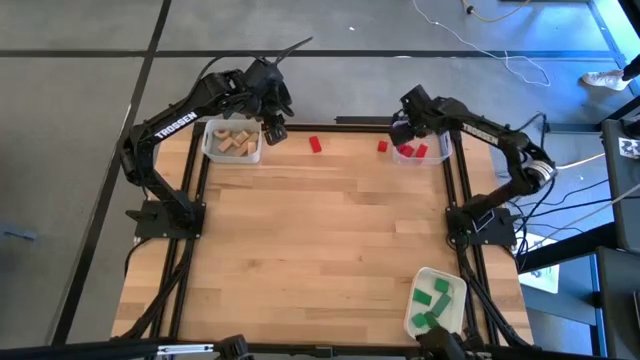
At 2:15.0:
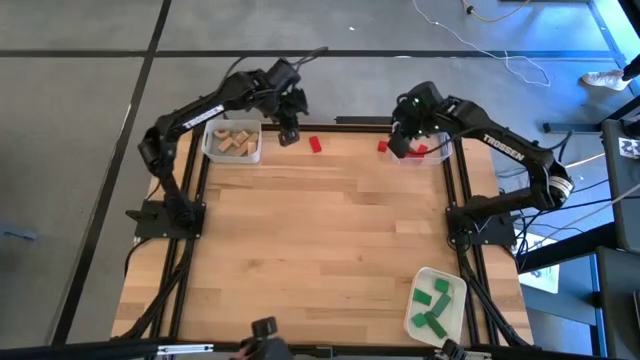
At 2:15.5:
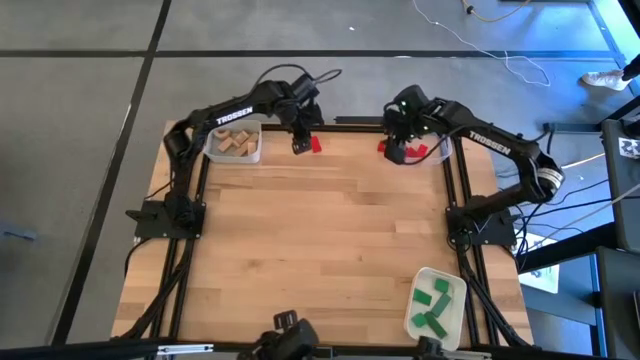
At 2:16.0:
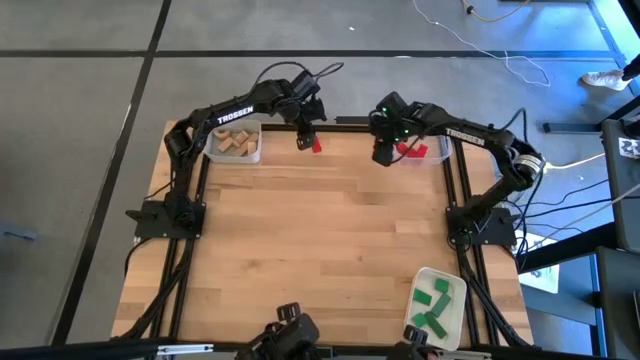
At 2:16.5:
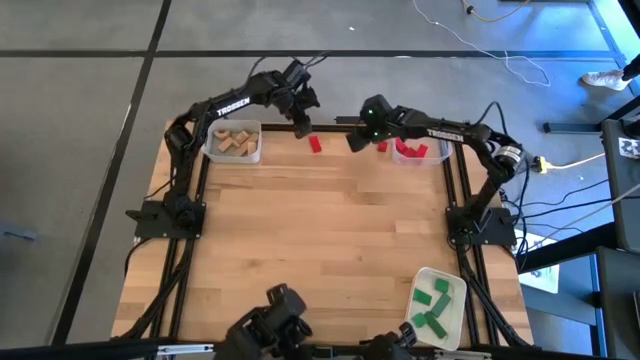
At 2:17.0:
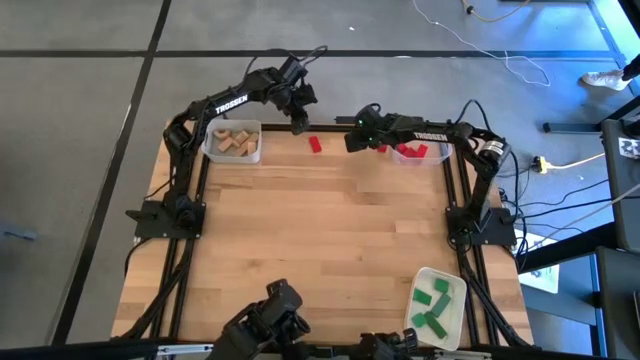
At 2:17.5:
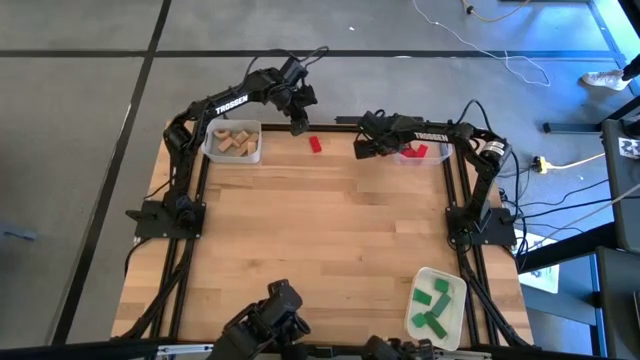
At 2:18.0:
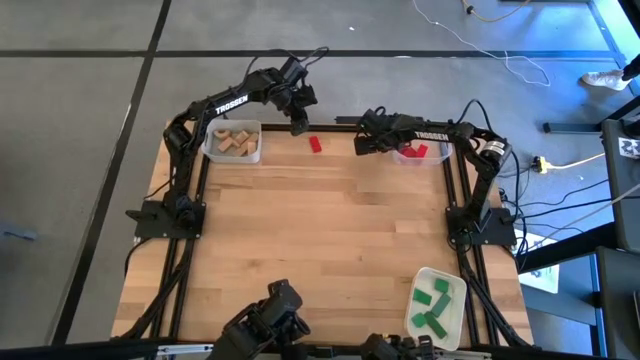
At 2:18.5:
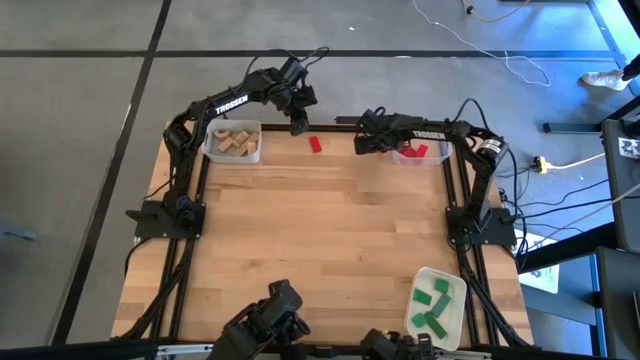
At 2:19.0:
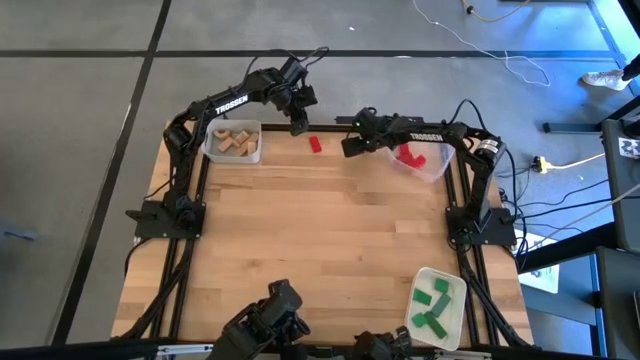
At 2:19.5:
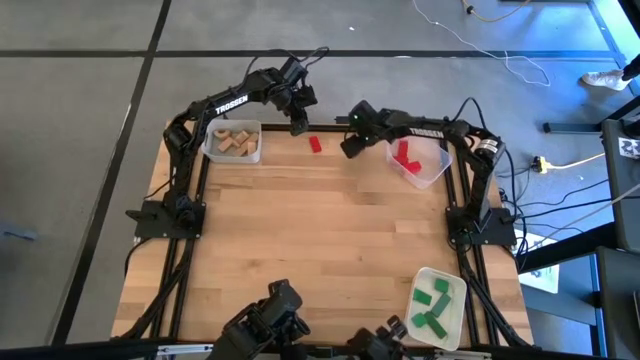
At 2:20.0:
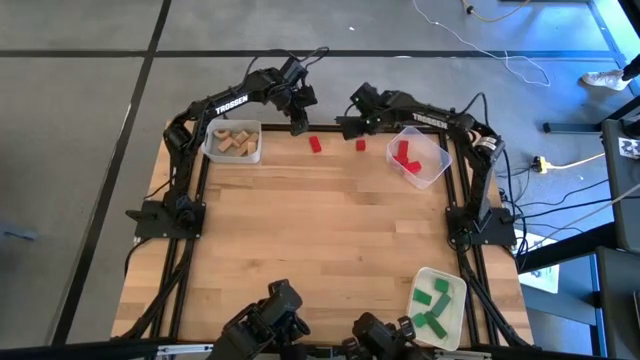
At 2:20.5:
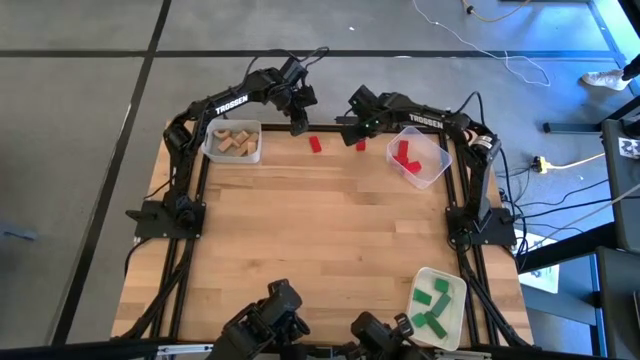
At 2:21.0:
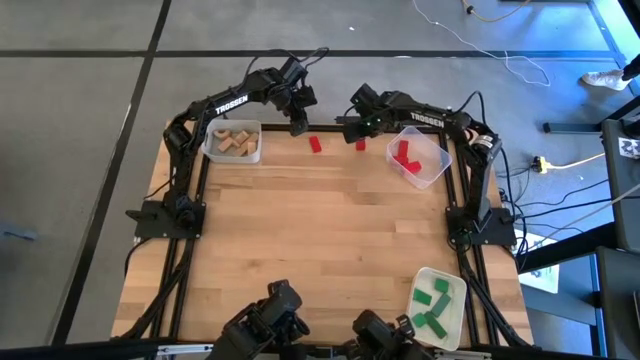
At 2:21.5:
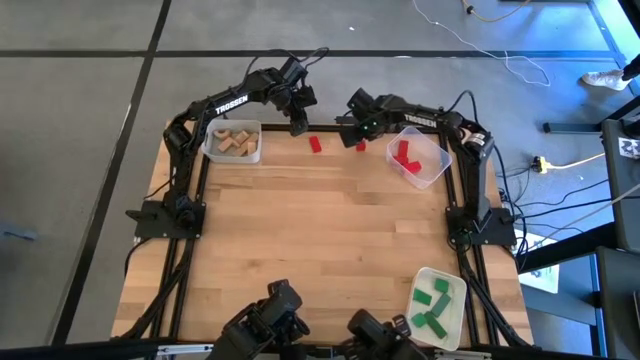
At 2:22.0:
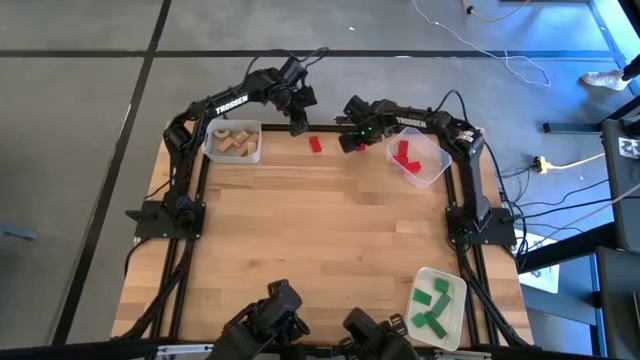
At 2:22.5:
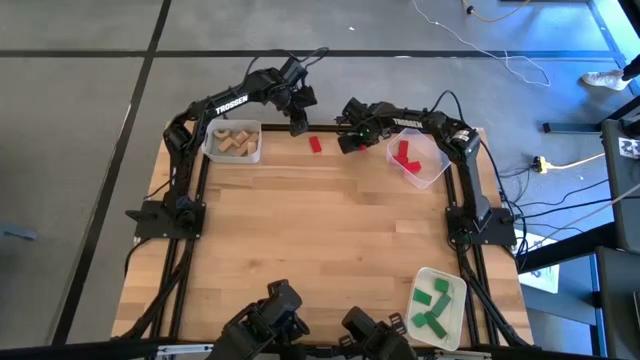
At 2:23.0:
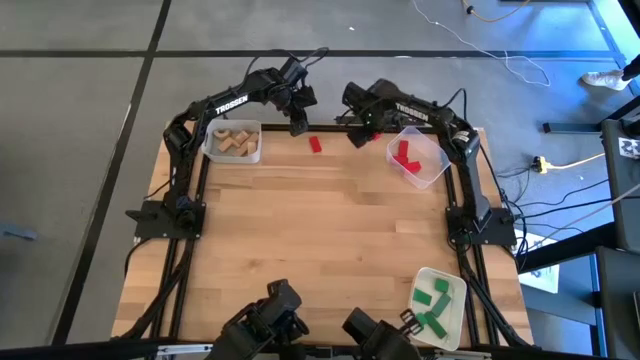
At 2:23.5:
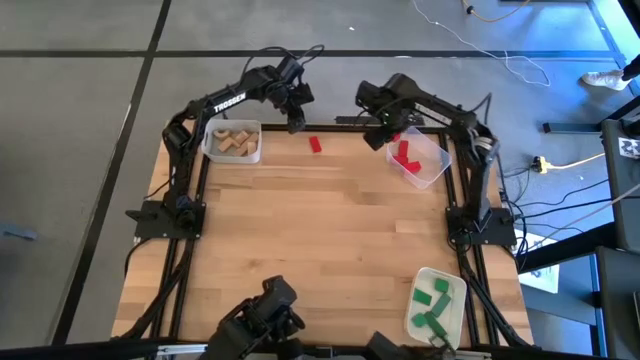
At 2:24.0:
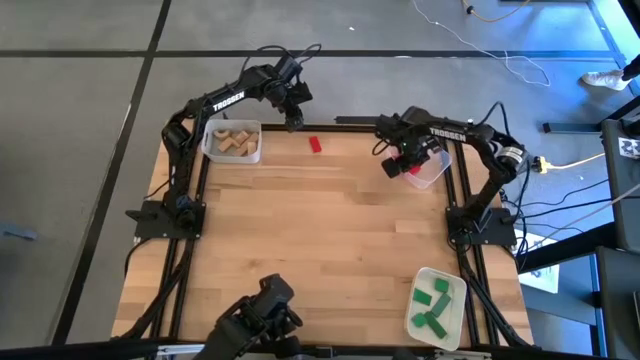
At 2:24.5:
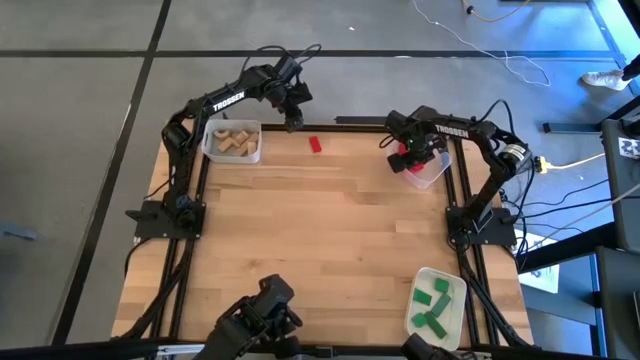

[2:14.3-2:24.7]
Task: Sort & place blocks by color
Put the red block into the transparent bin

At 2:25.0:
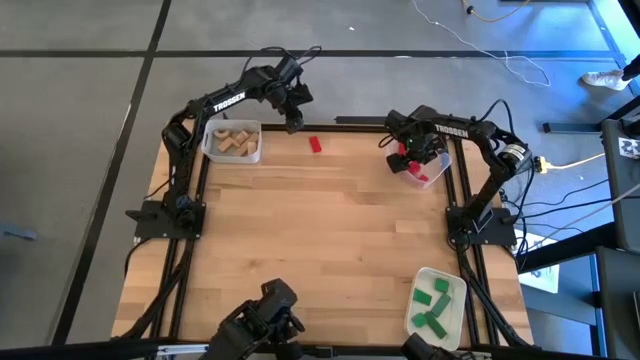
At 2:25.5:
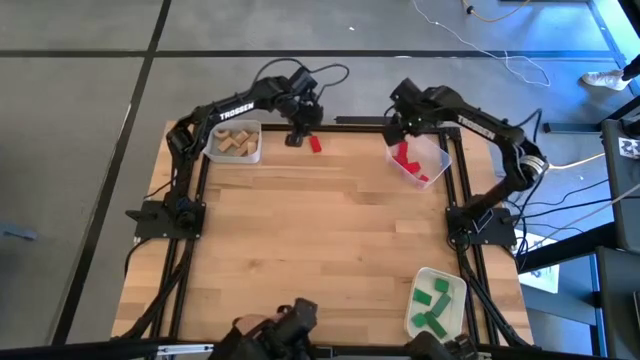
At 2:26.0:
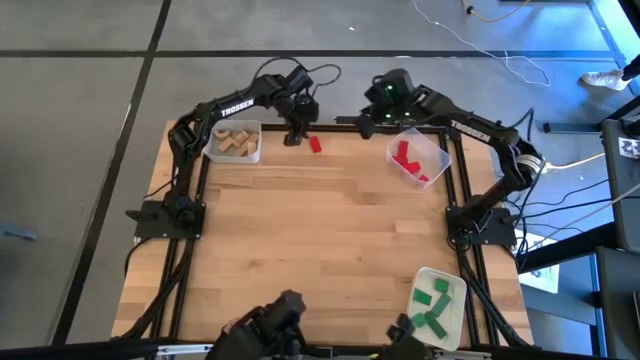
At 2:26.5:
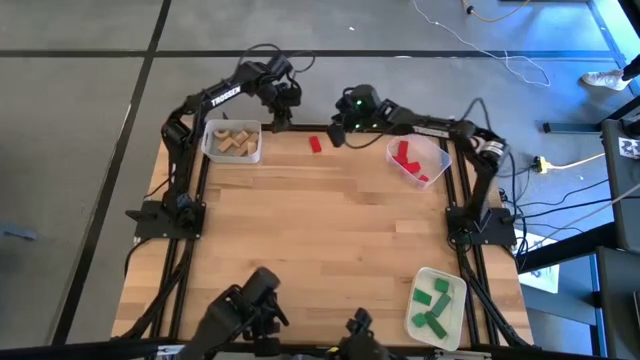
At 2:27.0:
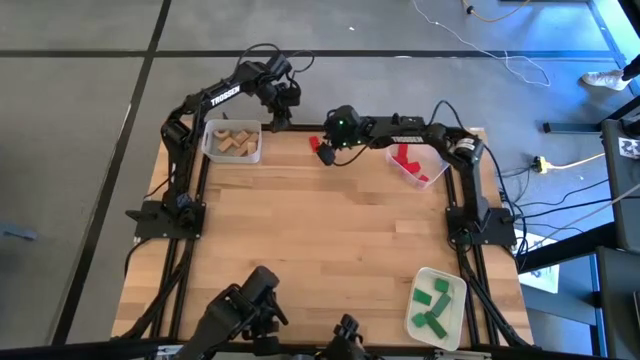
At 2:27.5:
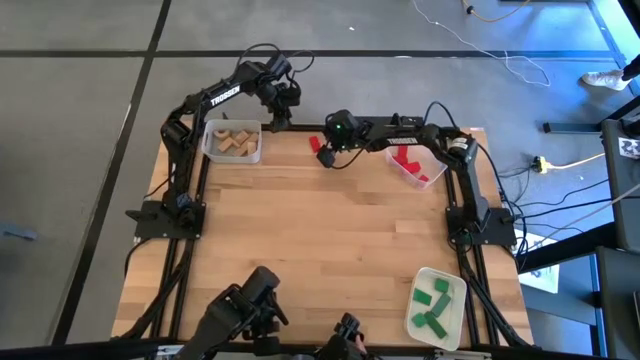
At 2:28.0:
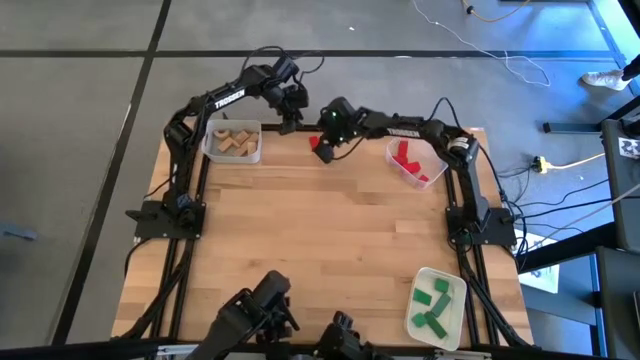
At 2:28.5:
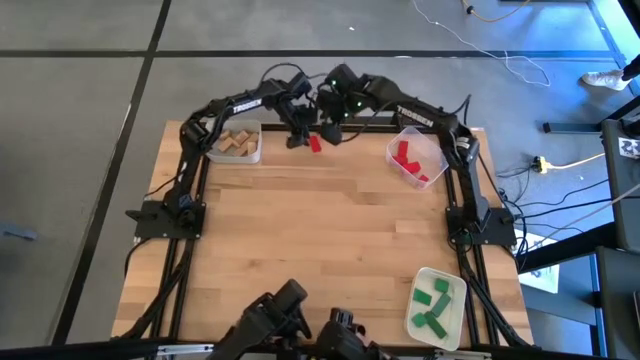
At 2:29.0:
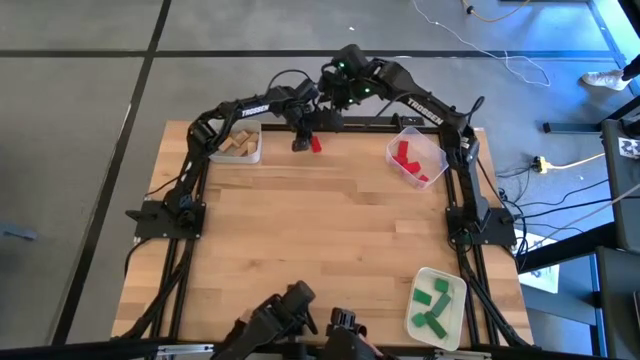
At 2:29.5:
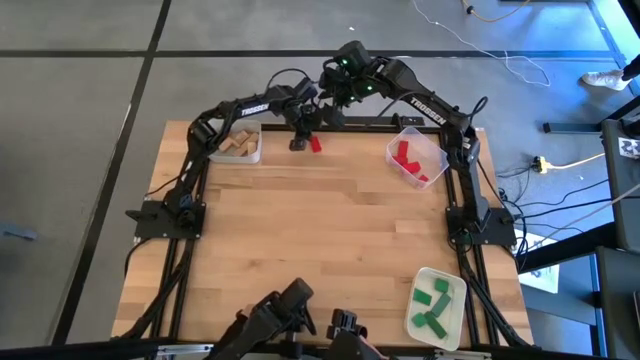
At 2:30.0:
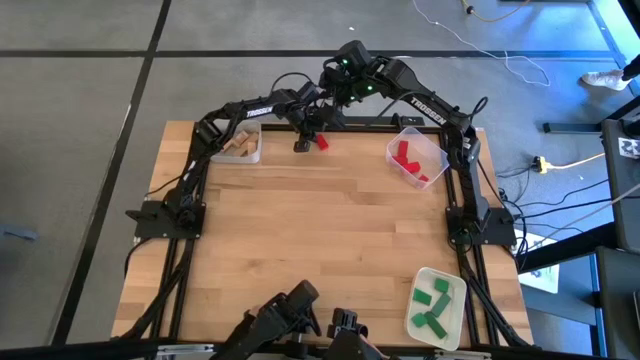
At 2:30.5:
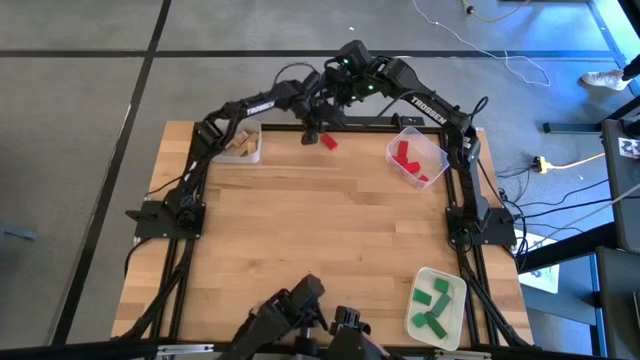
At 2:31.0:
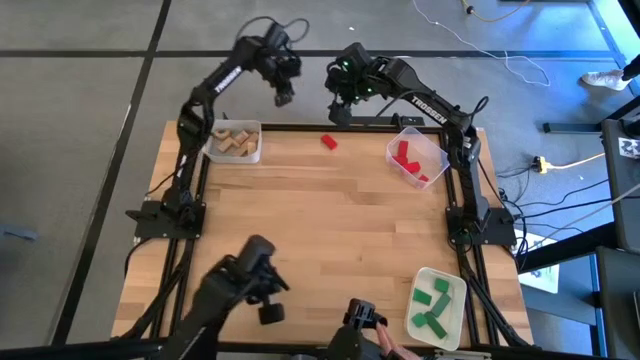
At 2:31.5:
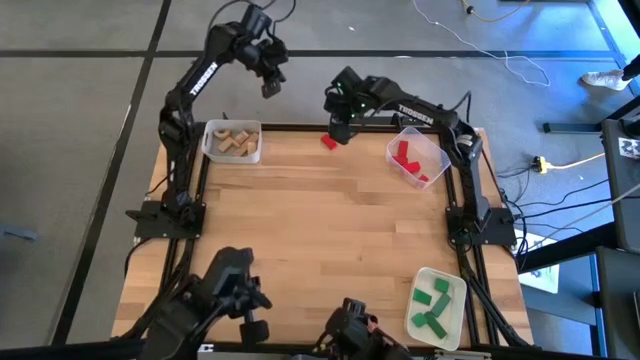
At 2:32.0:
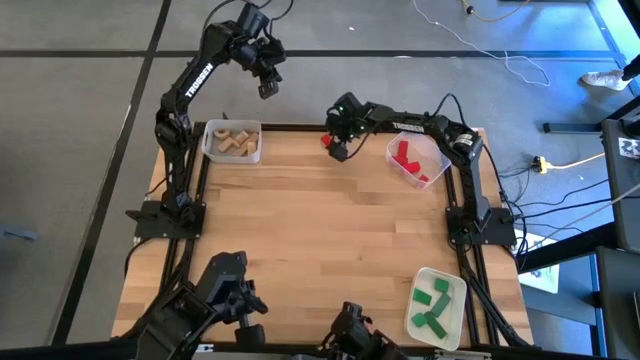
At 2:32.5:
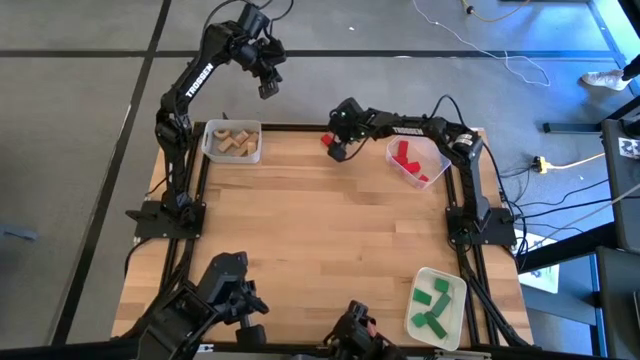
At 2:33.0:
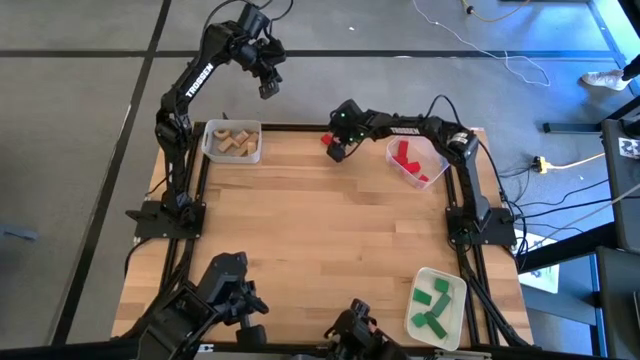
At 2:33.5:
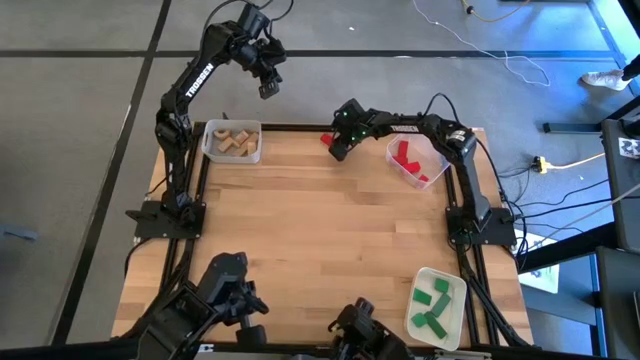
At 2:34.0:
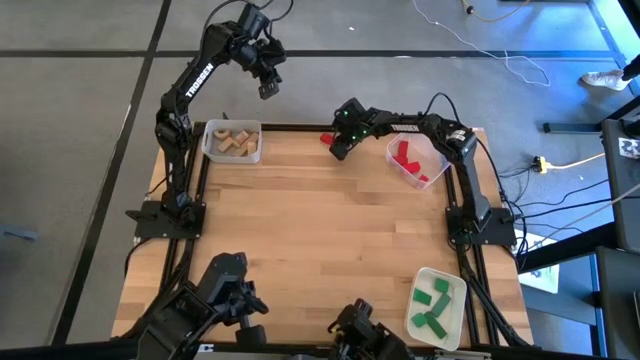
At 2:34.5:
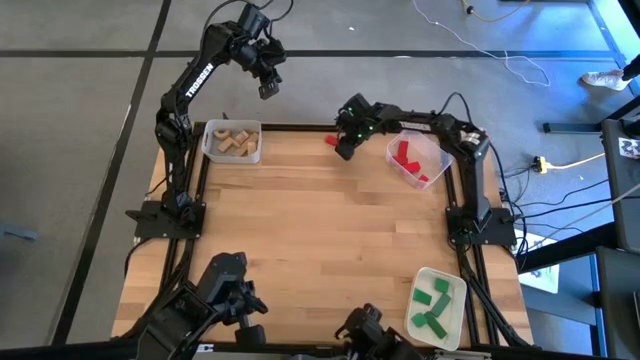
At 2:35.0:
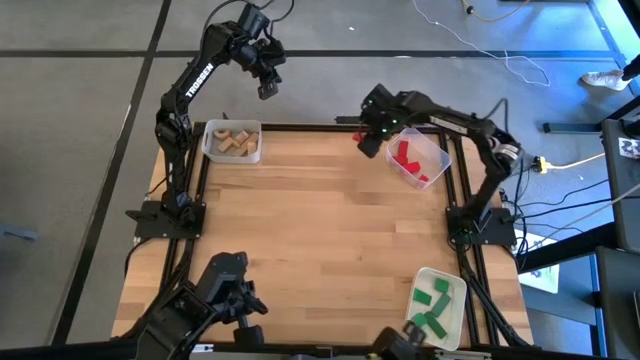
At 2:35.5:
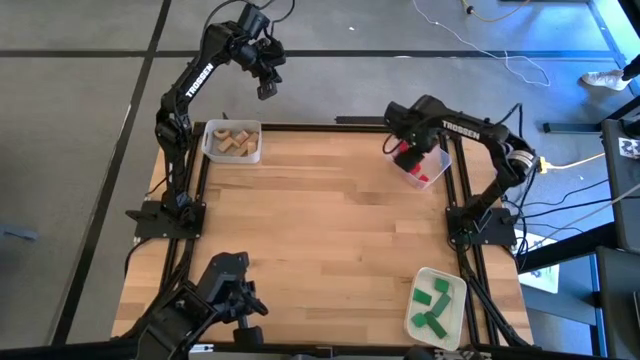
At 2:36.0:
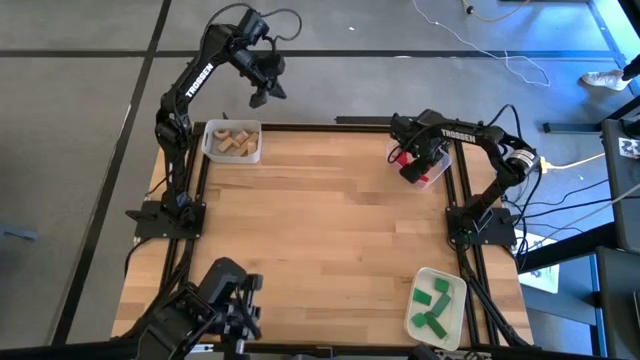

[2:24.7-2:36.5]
Put the red block into the transparent bin
